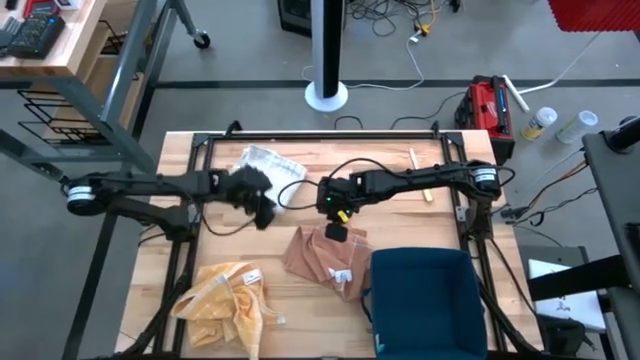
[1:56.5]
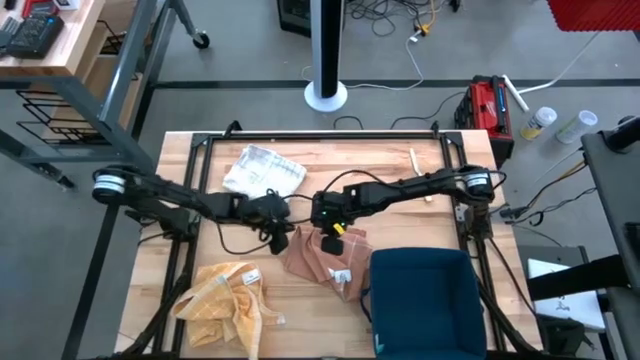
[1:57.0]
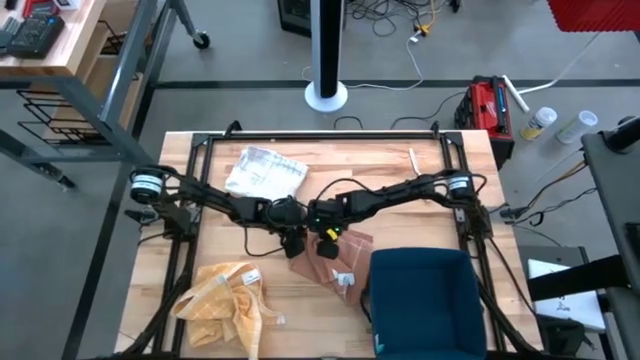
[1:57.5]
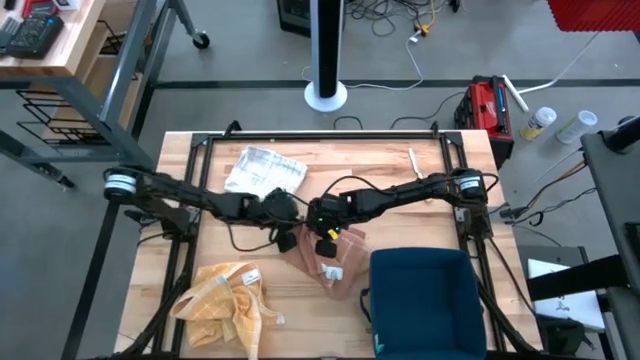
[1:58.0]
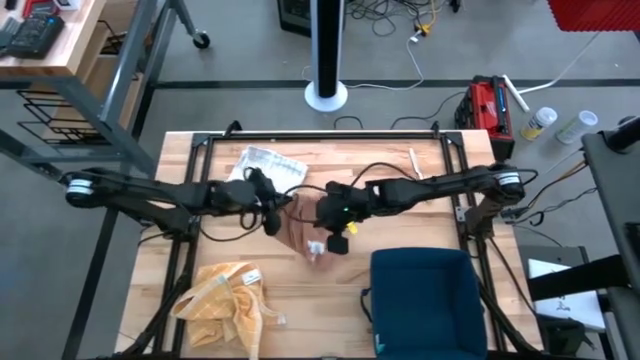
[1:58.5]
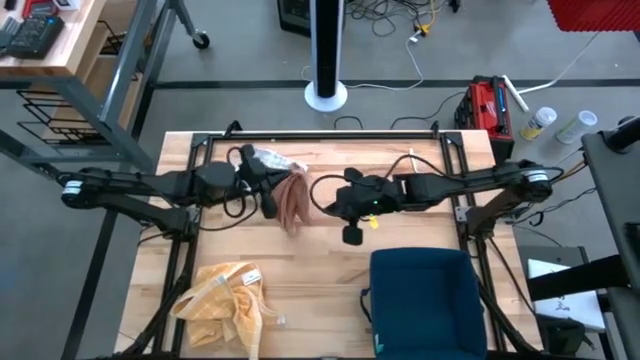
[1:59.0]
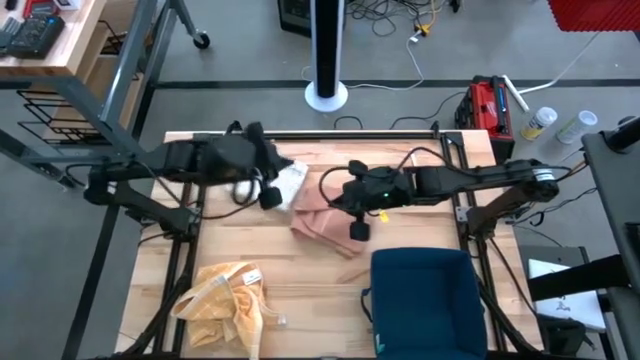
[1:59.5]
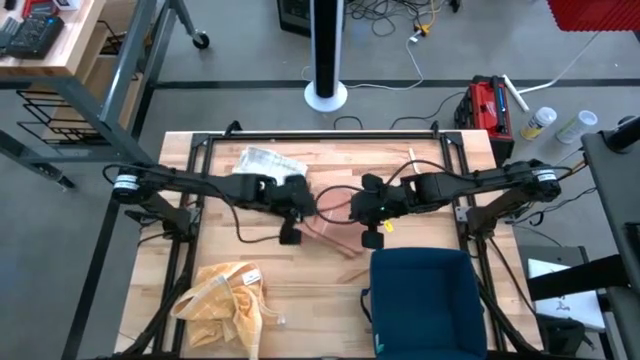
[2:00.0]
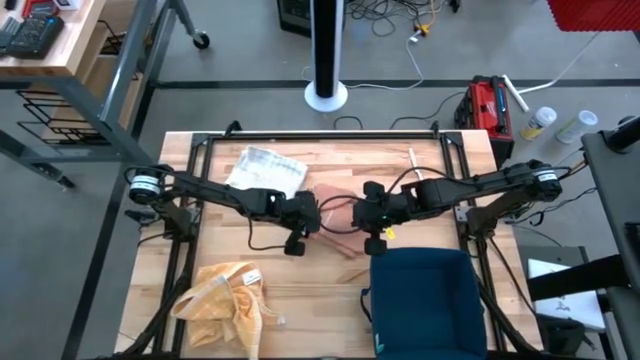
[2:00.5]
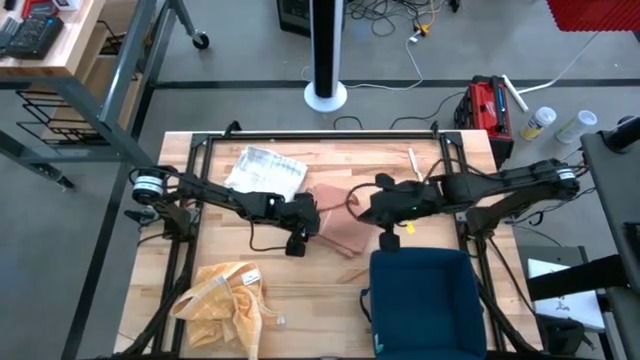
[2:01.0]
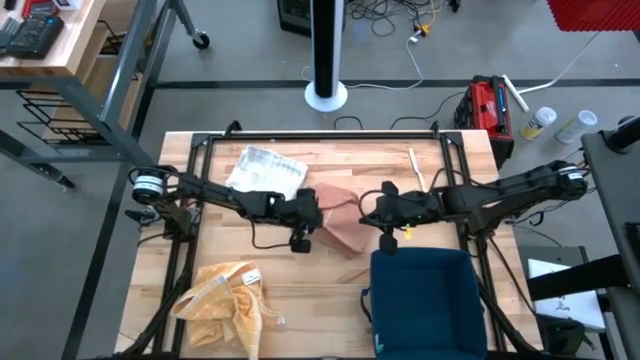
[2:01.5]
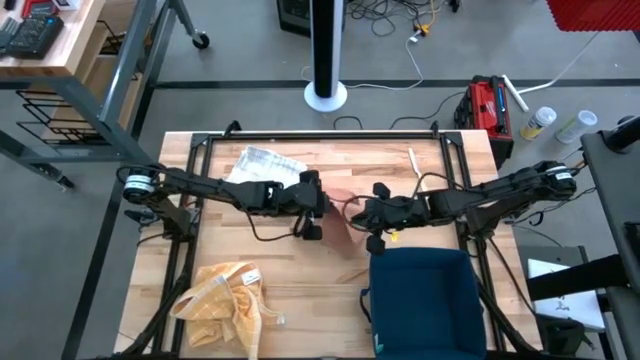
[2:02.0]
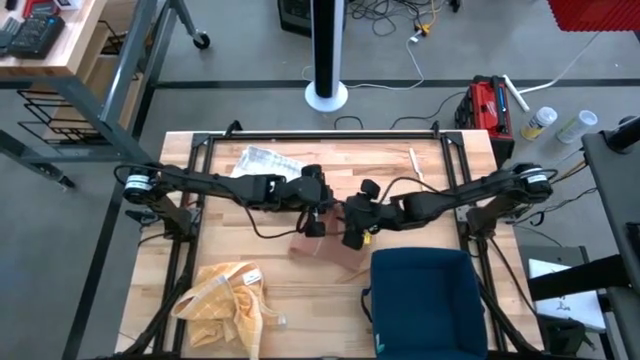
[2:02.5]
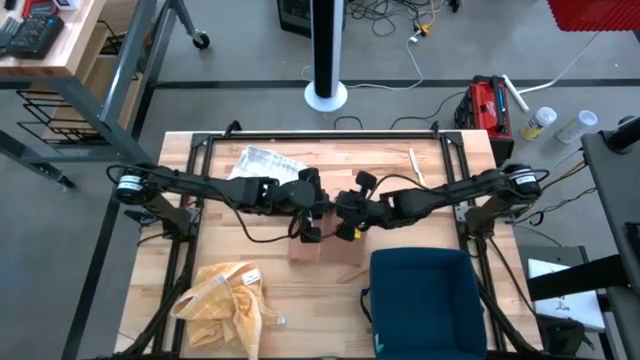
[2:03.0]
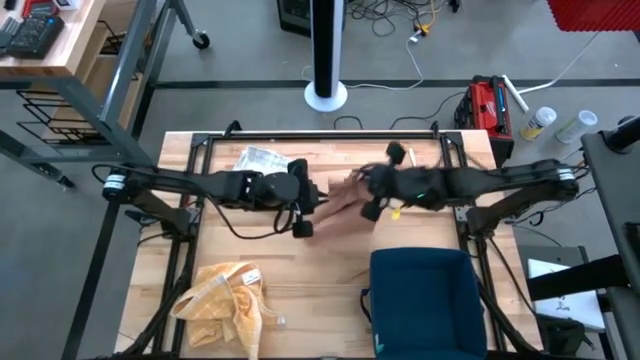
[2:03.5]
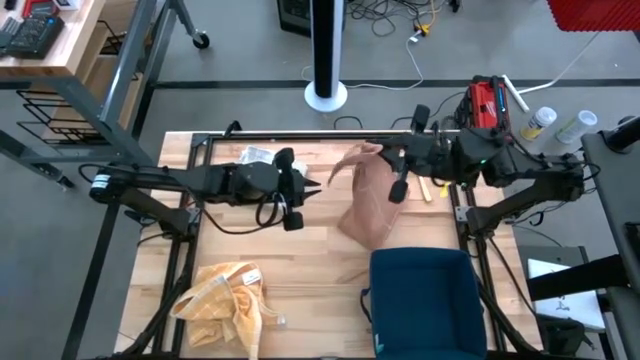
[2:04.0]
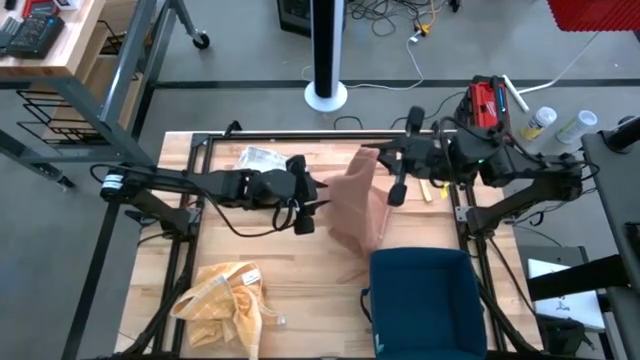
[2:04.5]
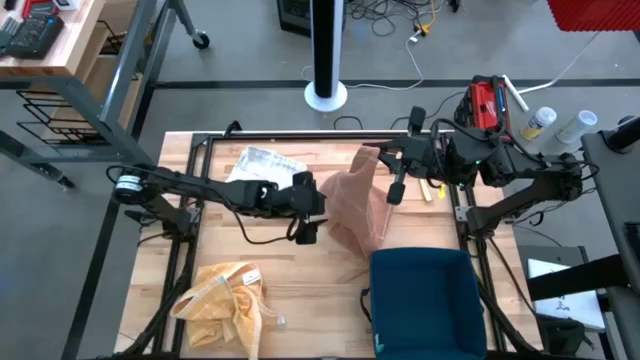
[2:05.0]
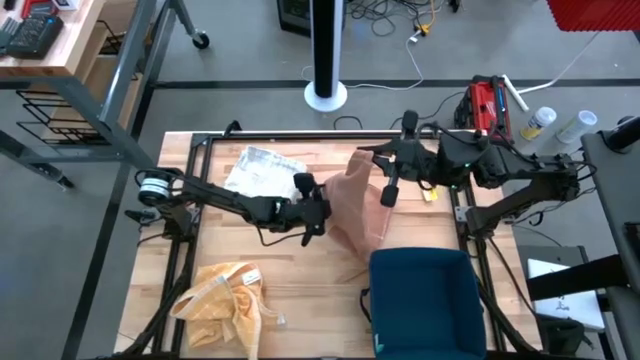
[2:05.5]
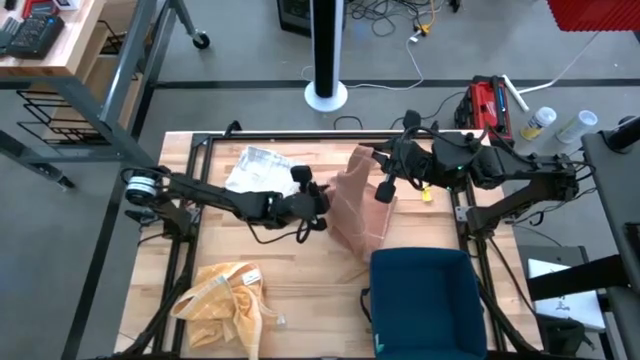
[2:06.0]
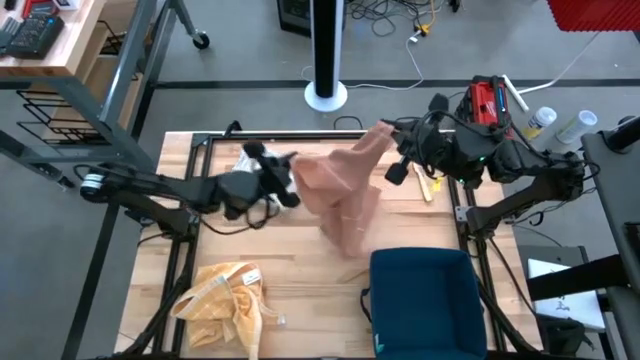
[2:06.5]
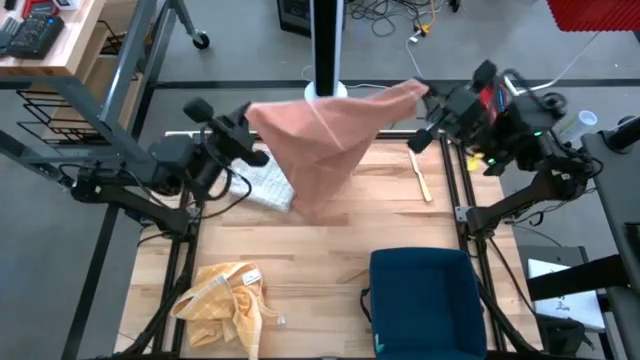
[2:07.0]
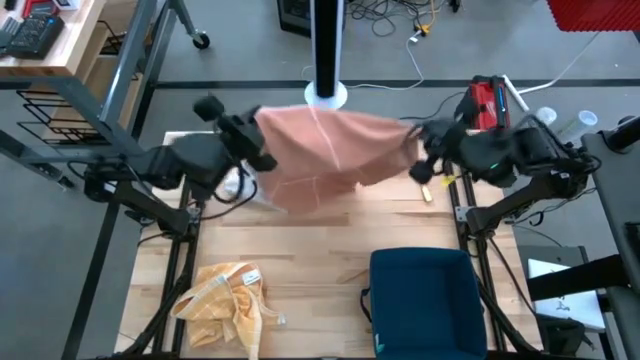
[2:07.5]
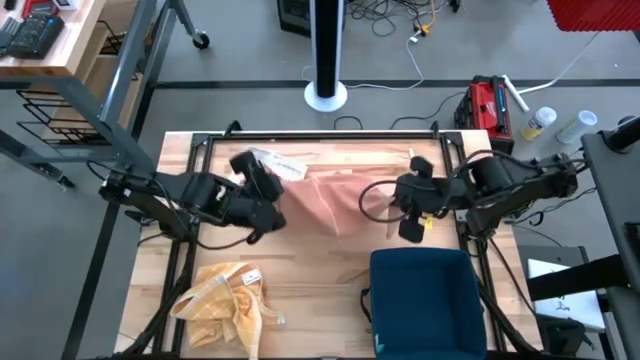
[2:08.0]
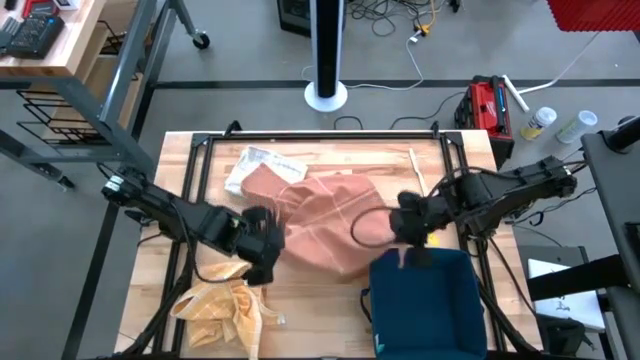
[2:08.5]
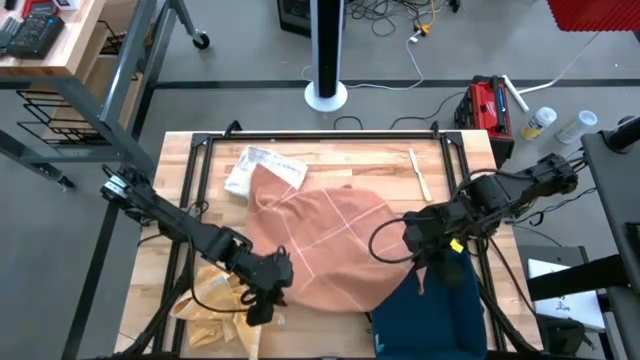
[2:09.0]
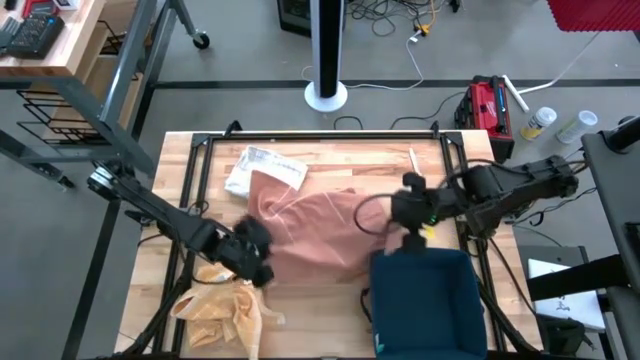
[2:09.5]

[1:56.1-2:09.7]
Task: Fold towel
Fold the brown towel

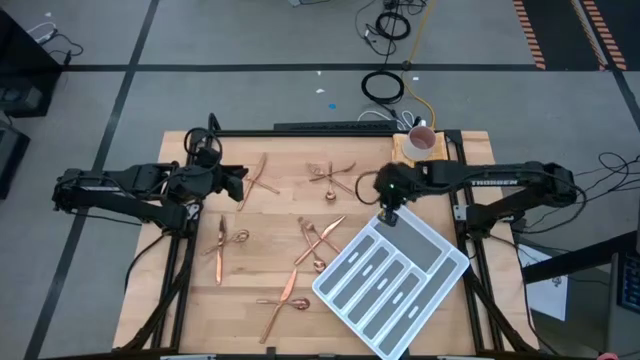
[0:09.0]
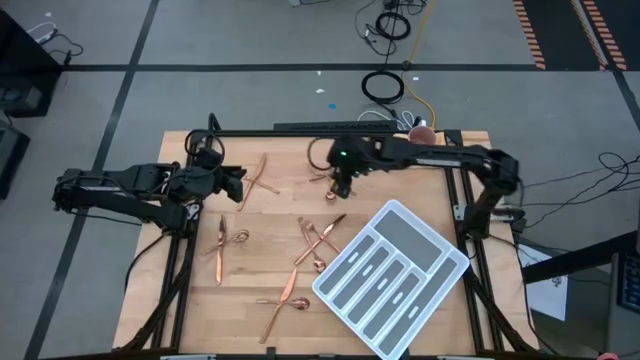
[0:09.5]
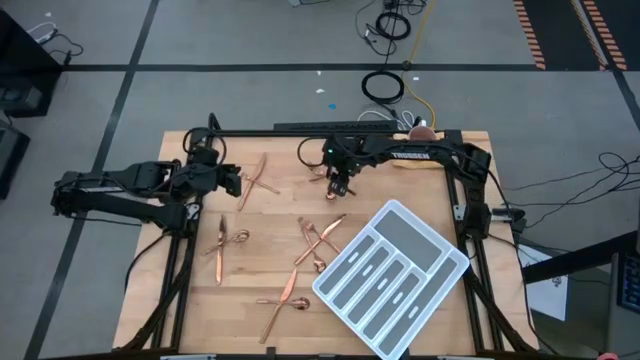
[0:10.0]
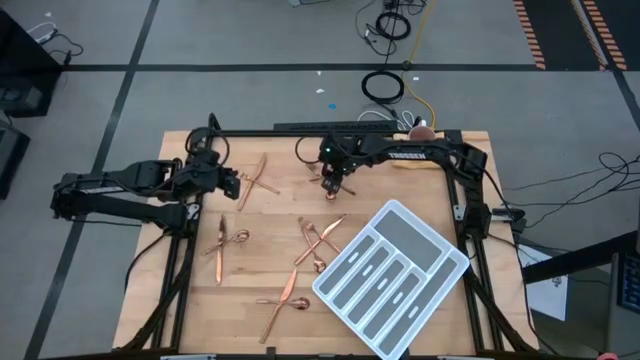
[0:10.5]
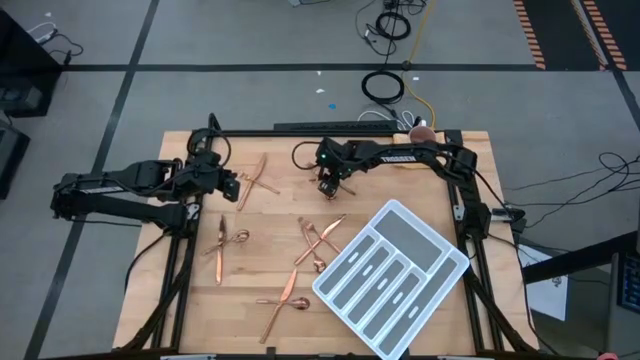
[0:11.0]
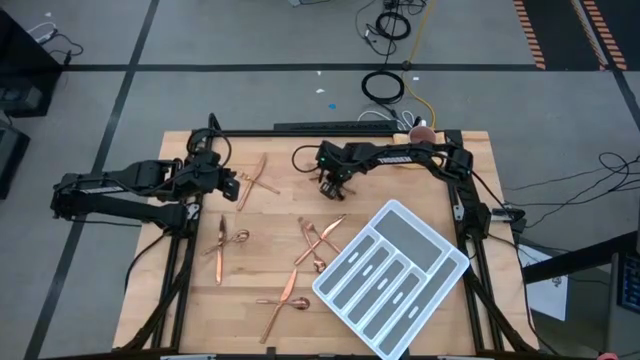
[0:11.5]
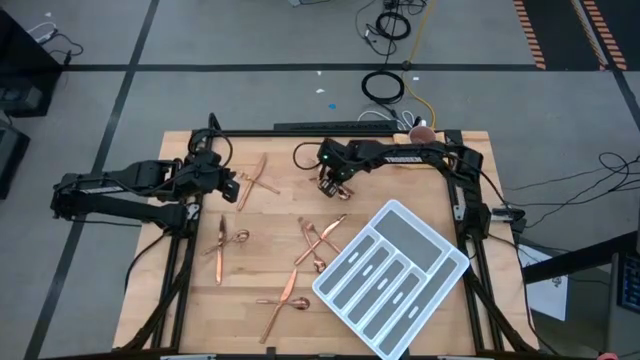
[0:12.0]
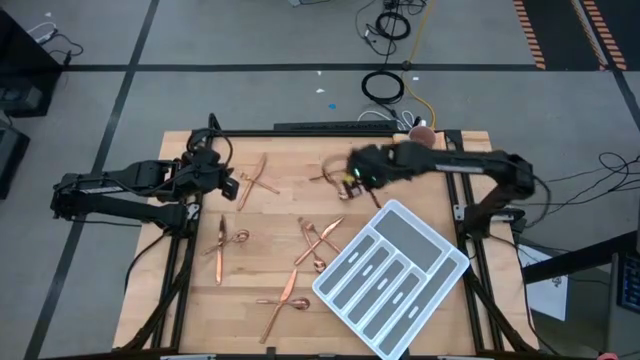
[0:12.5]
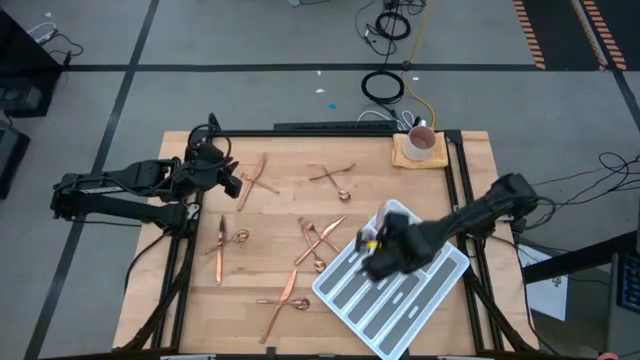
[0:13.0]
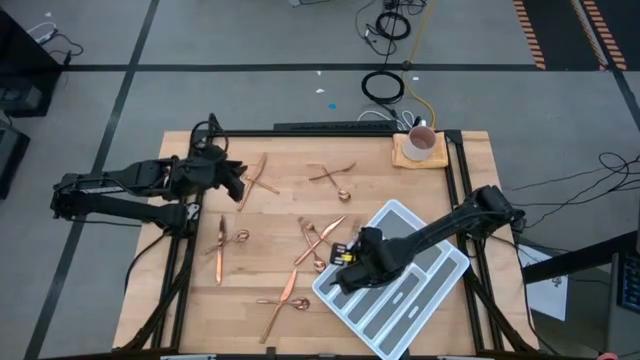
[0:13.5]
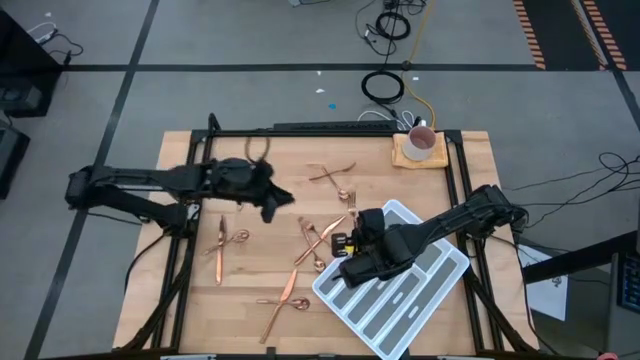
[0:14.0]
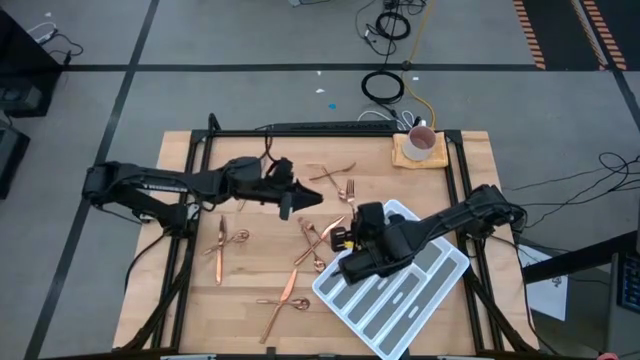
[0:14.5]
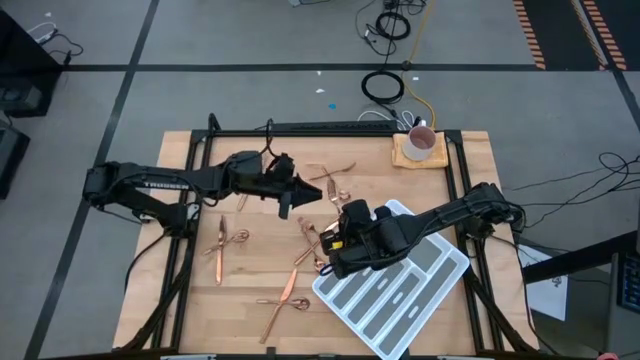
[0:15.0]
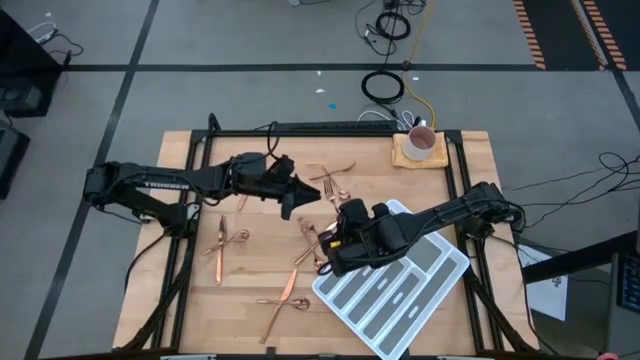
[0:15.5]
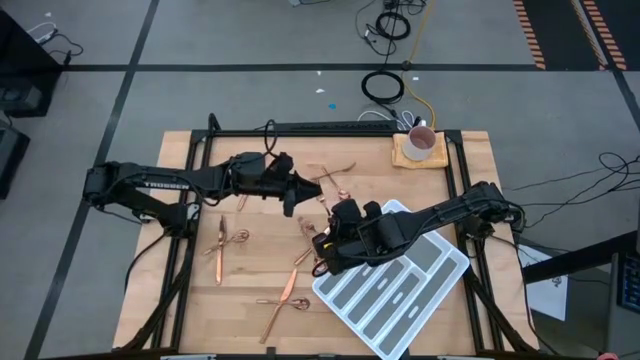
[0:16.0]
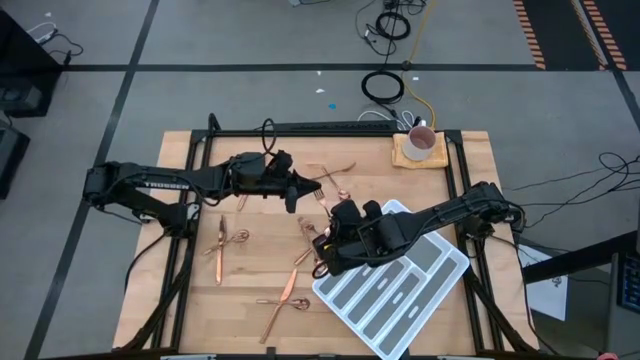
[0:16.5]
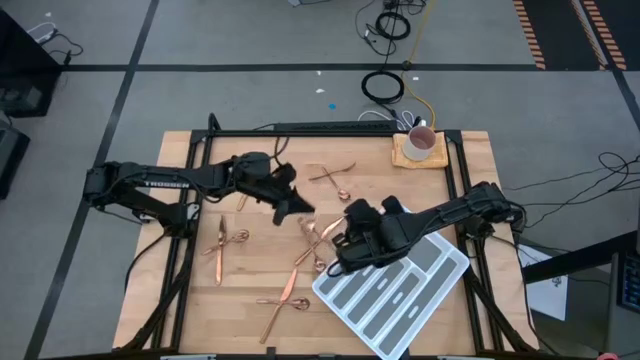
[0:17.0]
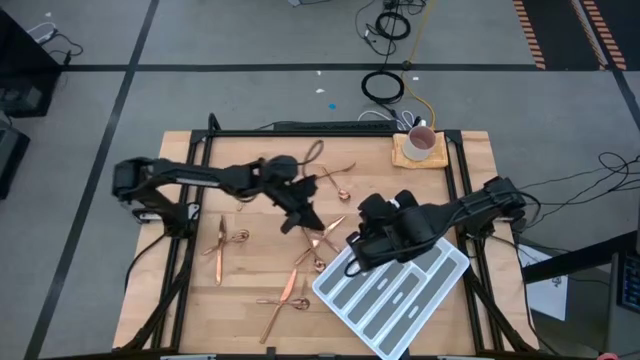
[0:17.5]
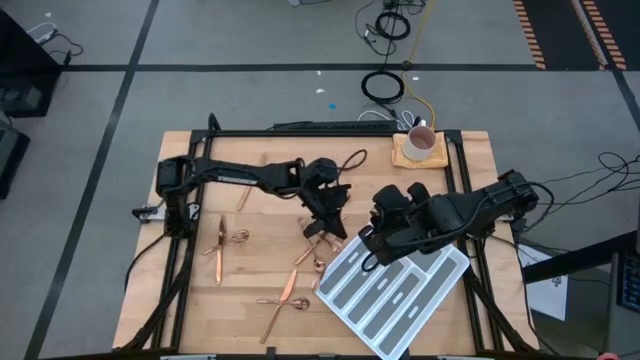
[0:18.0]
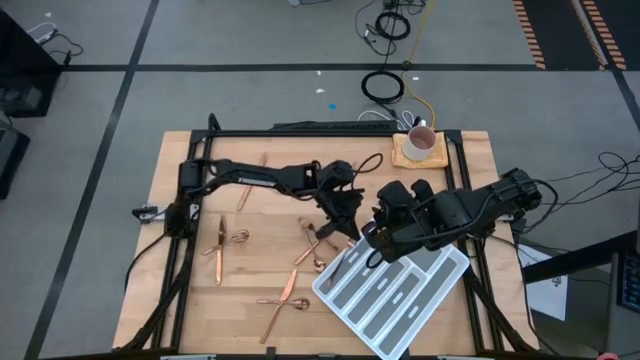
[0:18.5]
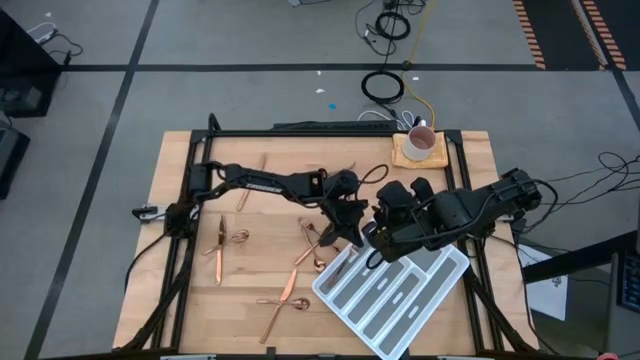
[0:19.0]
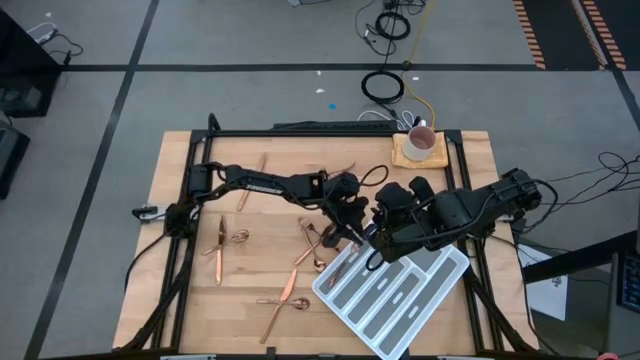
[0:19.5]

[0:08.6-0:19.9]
Task: Sort silverware
Put the gold fork into the silverware tray
